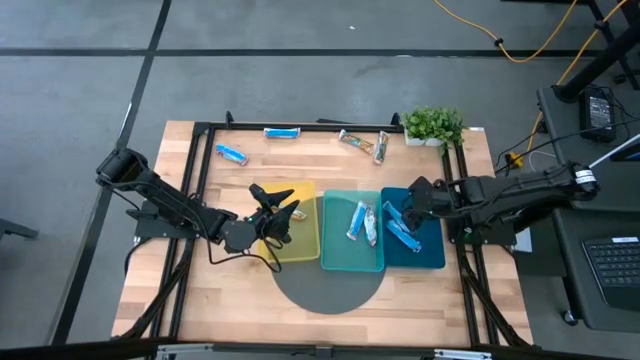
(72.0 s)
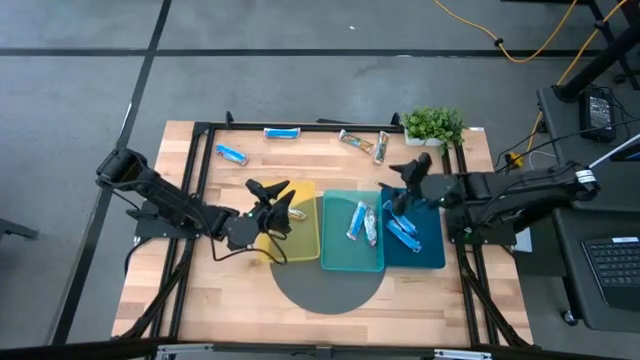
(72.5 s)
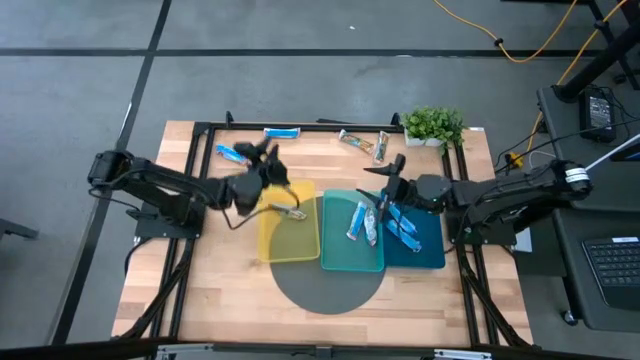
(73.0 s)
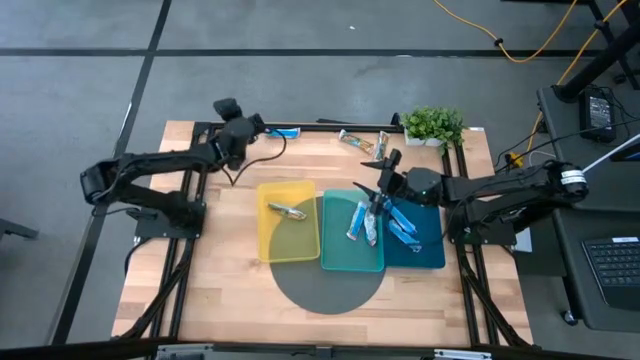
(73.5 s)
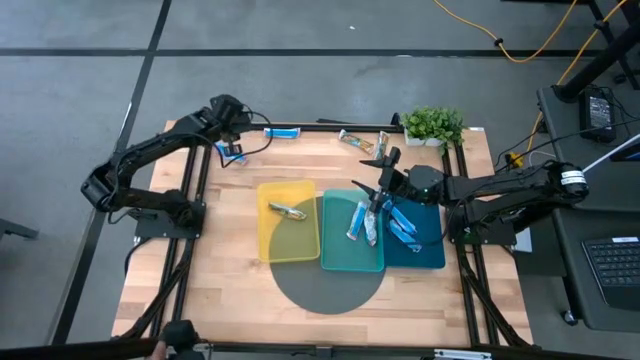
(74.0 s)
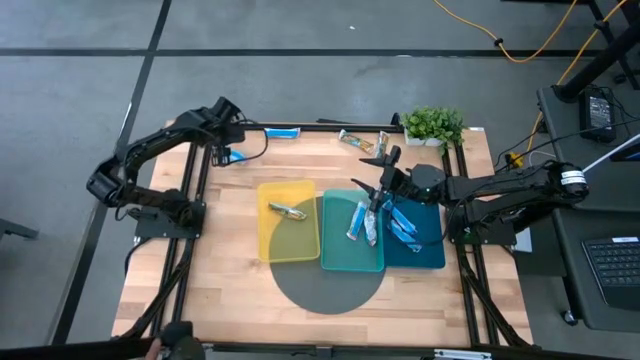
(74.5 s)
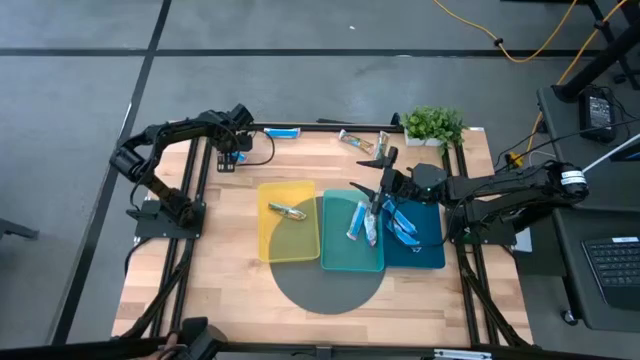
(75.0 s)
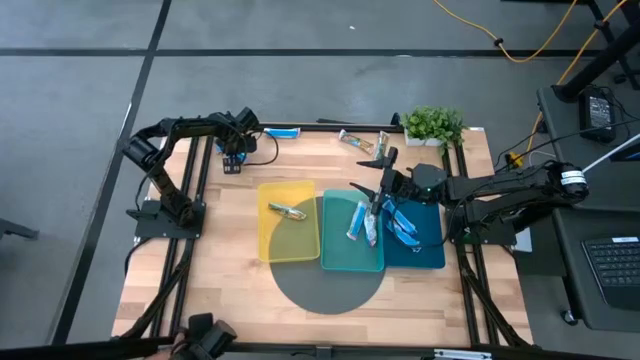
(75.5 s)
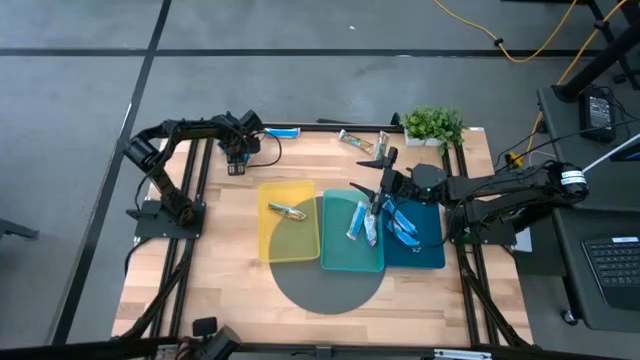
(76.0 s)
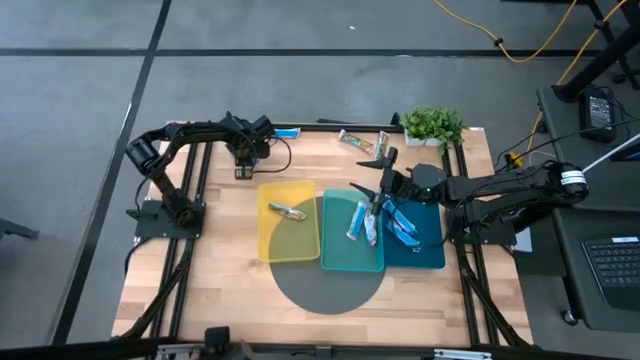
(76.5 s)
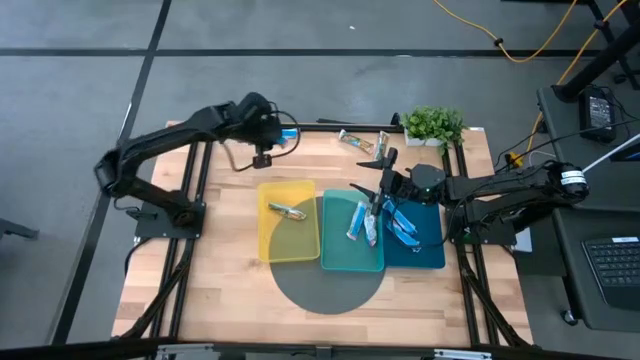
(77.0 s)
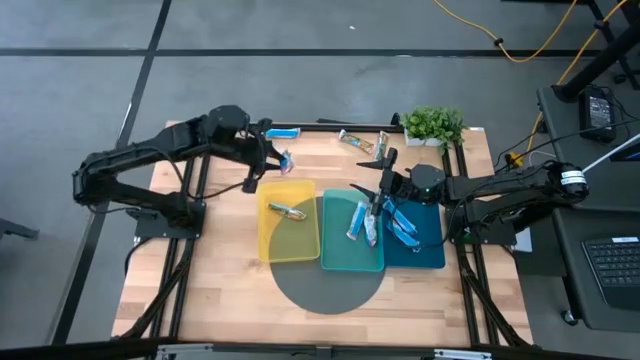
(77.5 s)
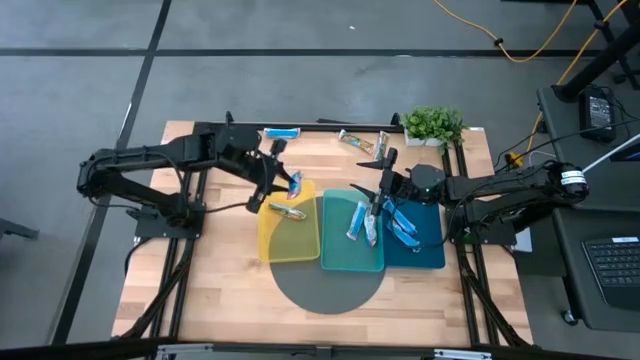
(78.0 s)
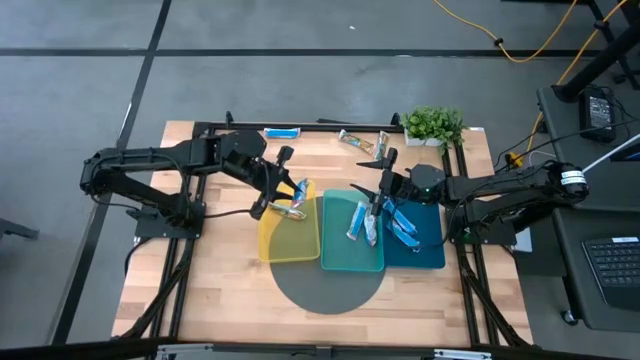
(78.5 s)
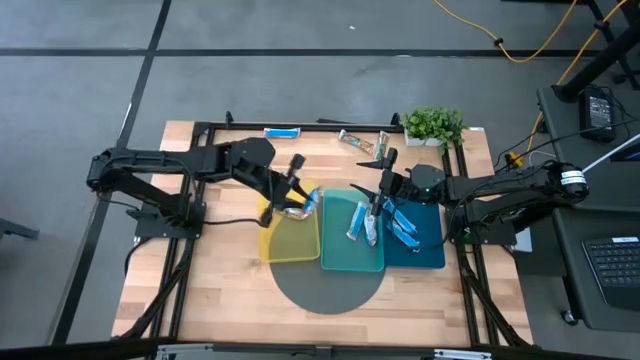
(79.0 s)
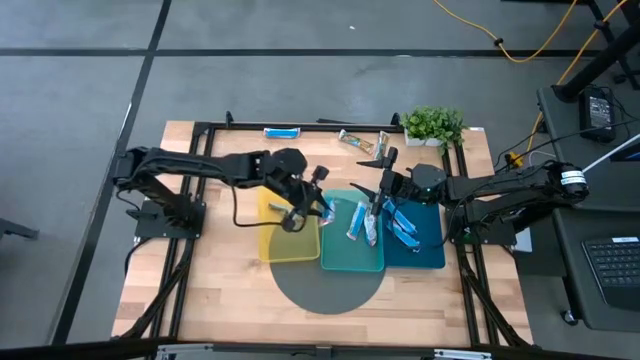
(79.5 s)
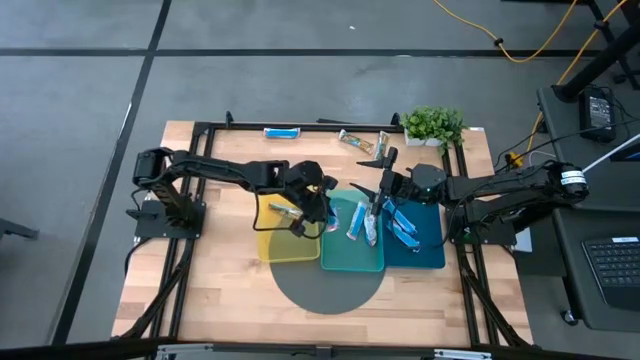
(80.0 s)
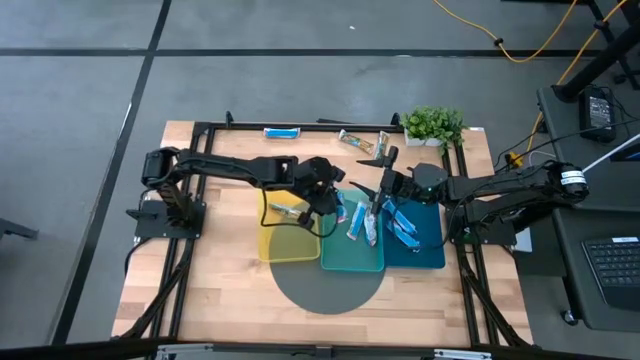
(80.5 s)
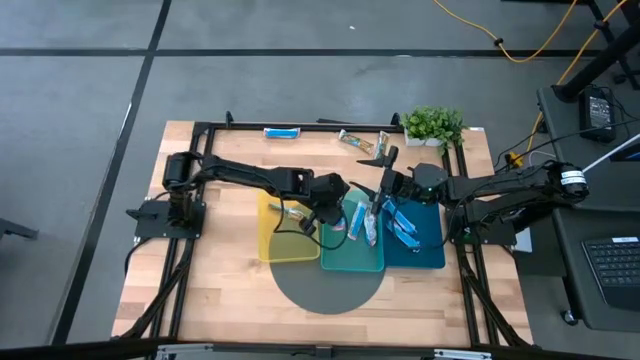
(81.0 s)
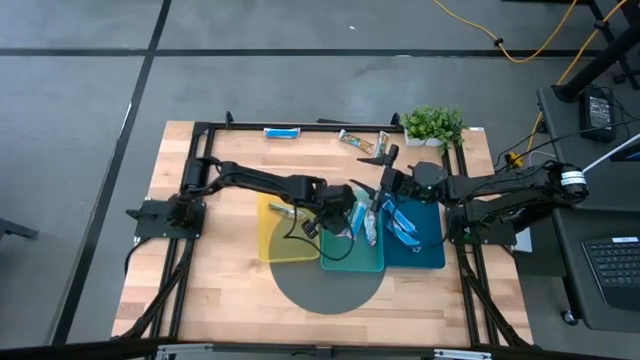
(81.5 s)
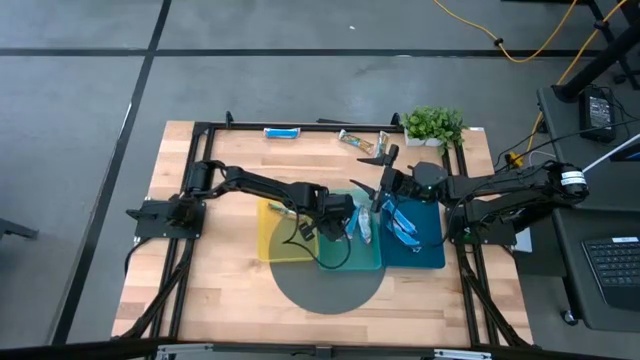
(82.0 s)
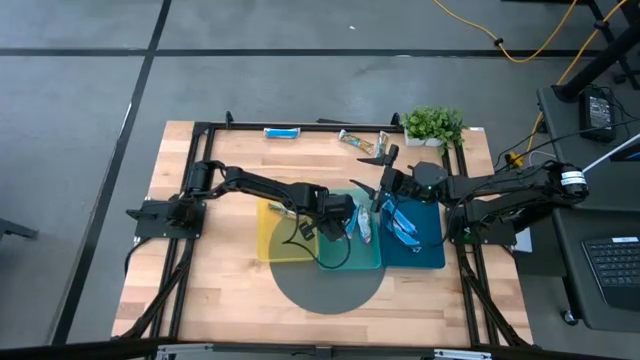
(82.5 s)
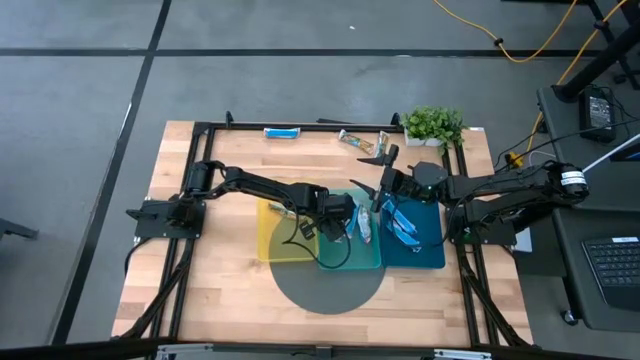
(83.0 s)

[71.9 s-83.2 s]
Task: Pick and place Granola Bars by type
Put the red granola bar into the green bin

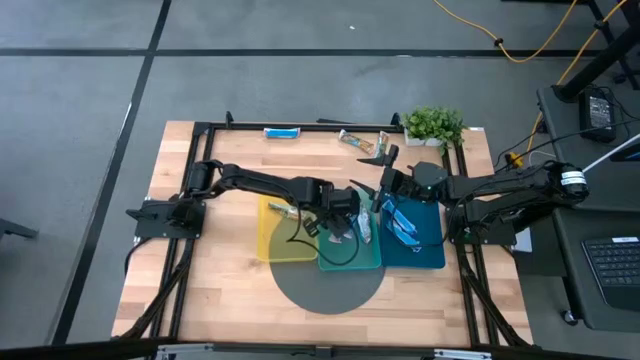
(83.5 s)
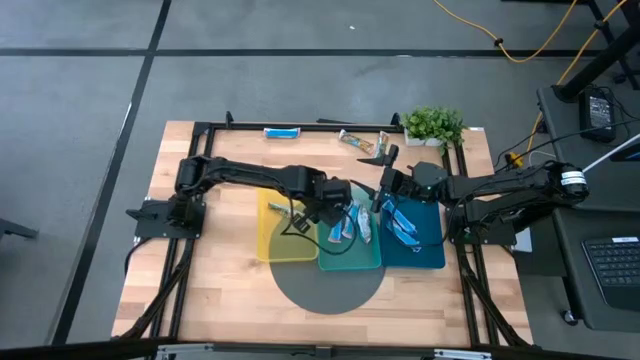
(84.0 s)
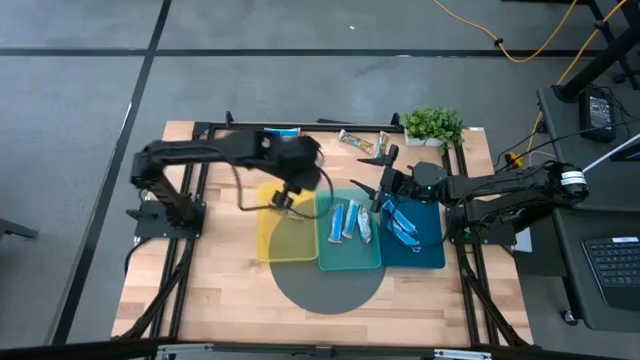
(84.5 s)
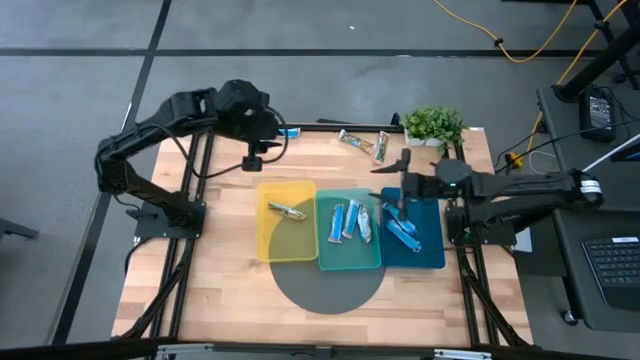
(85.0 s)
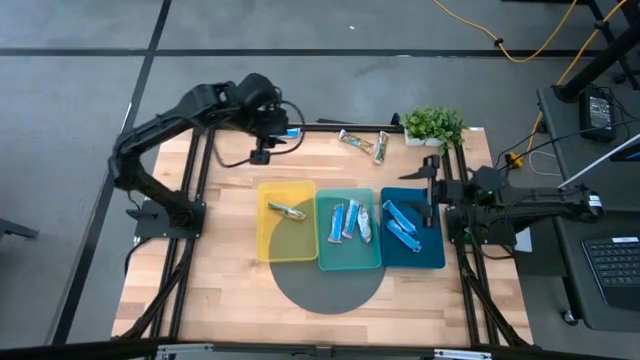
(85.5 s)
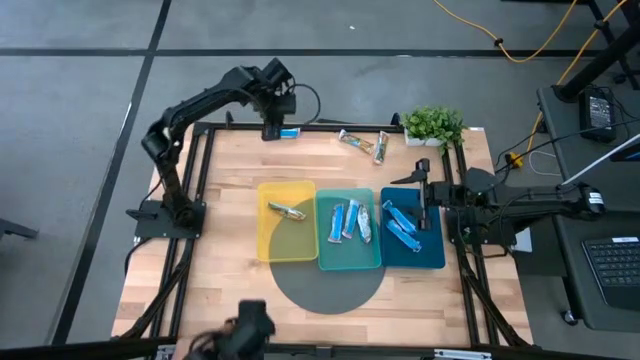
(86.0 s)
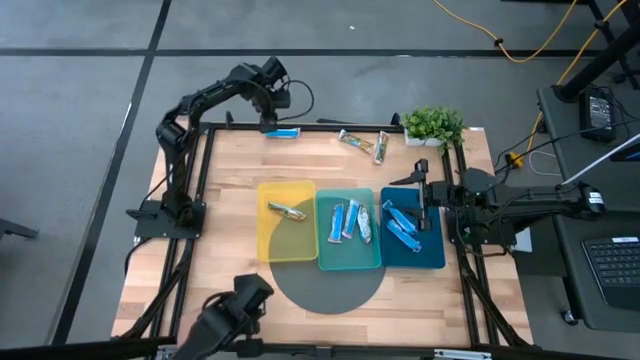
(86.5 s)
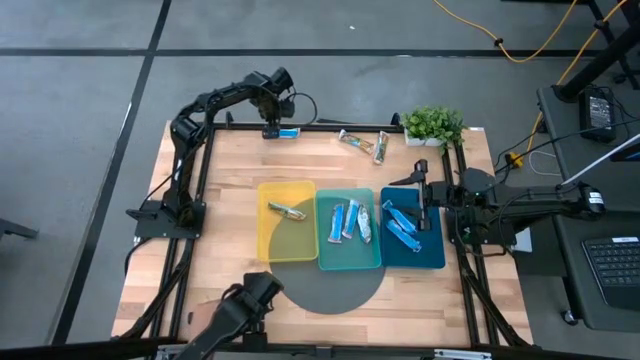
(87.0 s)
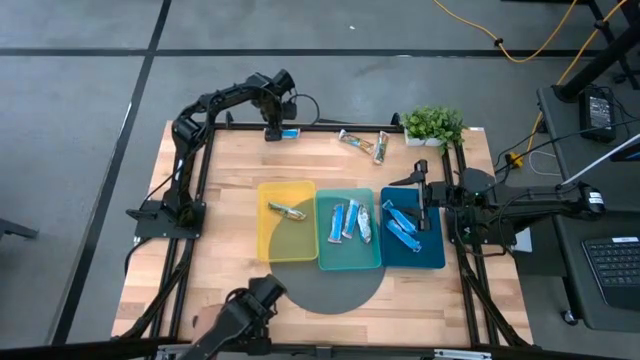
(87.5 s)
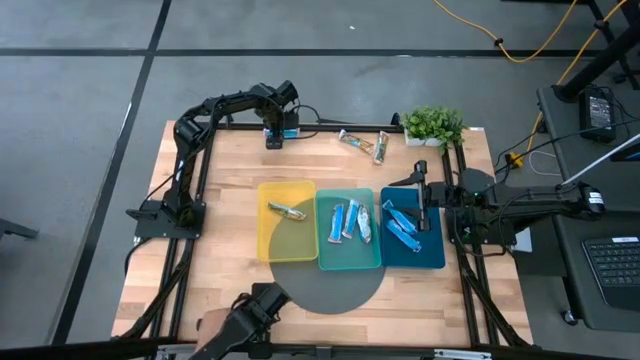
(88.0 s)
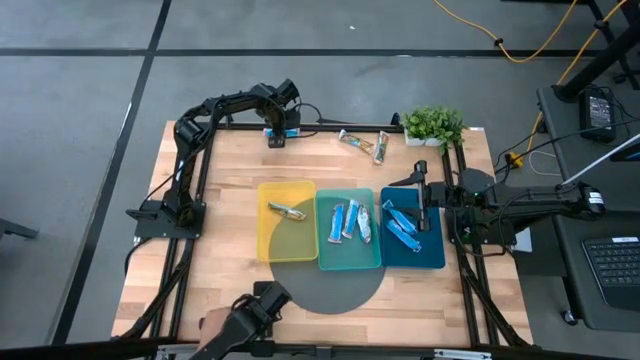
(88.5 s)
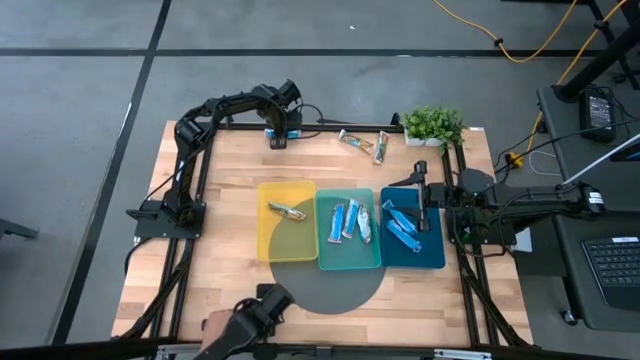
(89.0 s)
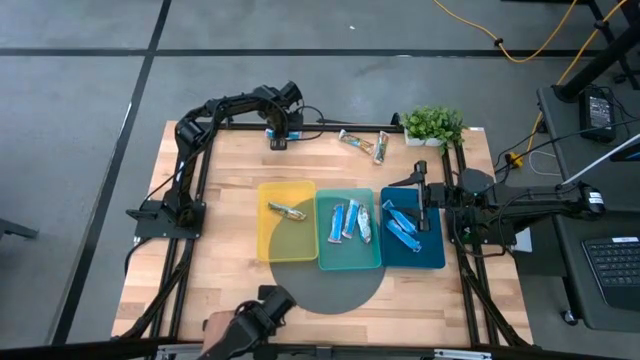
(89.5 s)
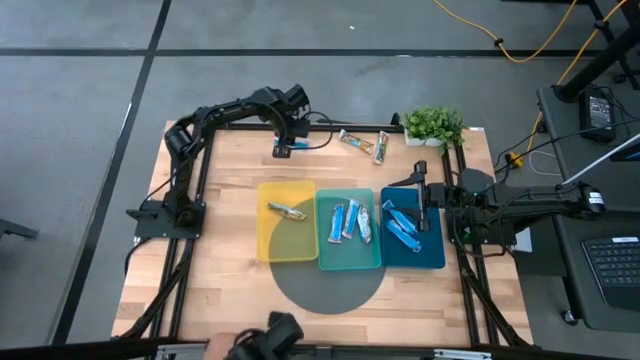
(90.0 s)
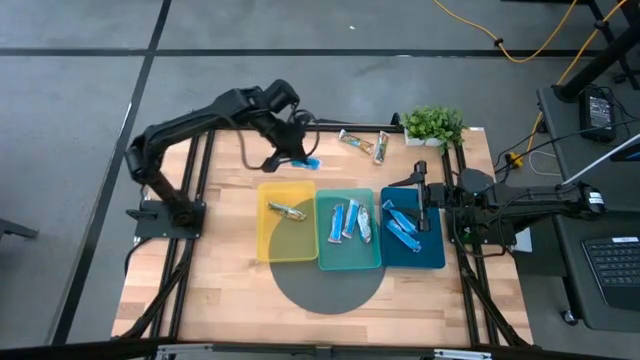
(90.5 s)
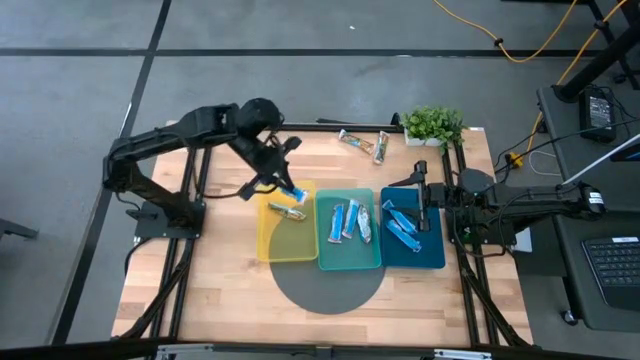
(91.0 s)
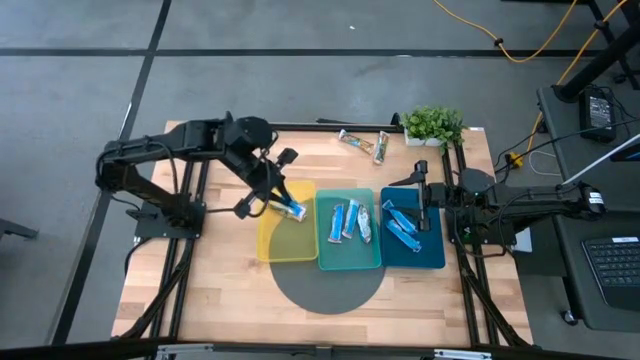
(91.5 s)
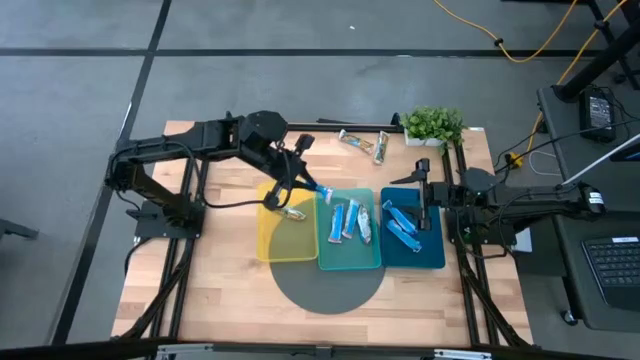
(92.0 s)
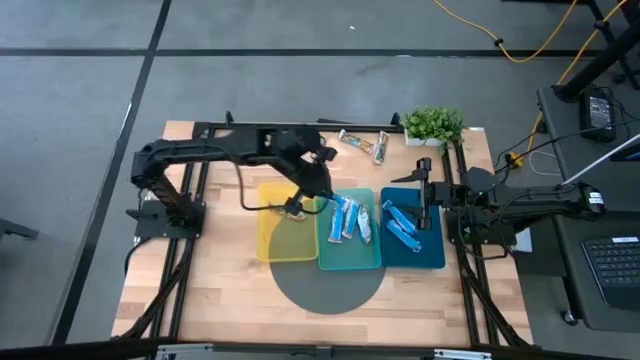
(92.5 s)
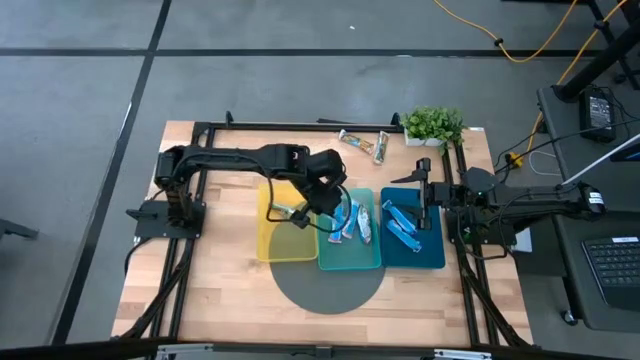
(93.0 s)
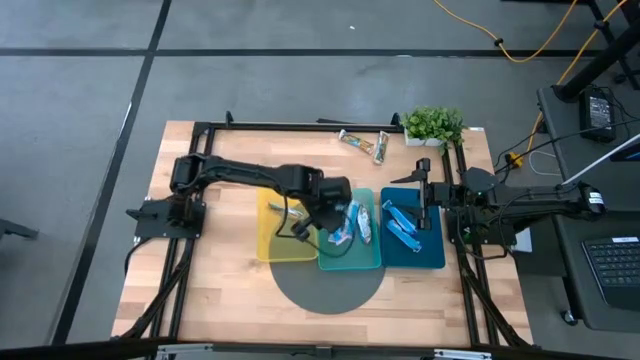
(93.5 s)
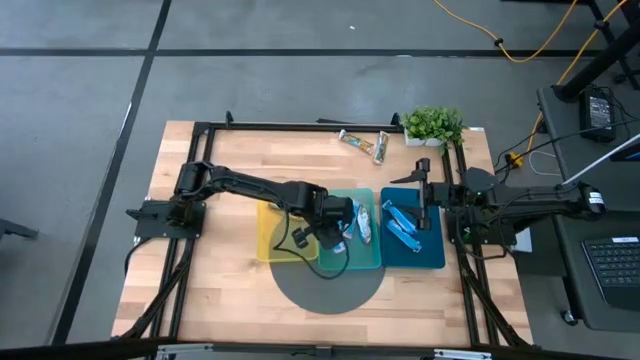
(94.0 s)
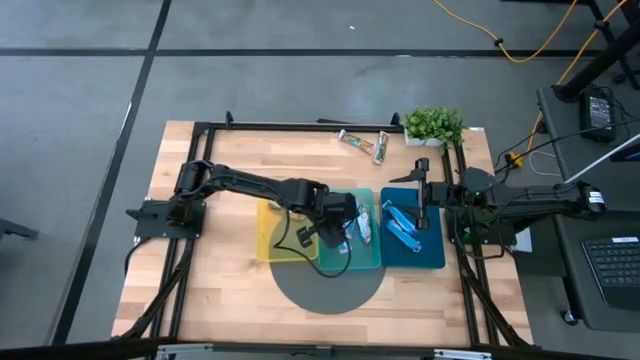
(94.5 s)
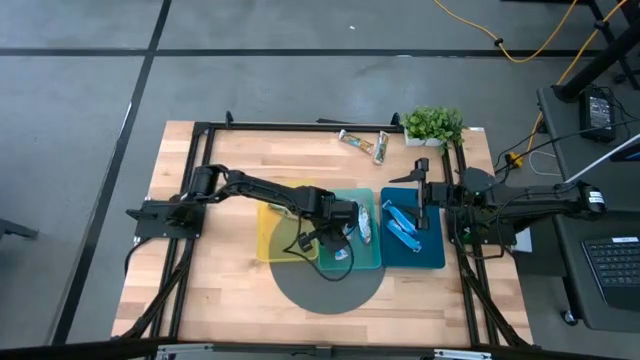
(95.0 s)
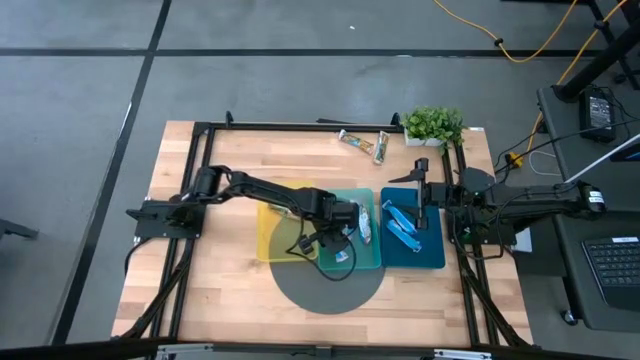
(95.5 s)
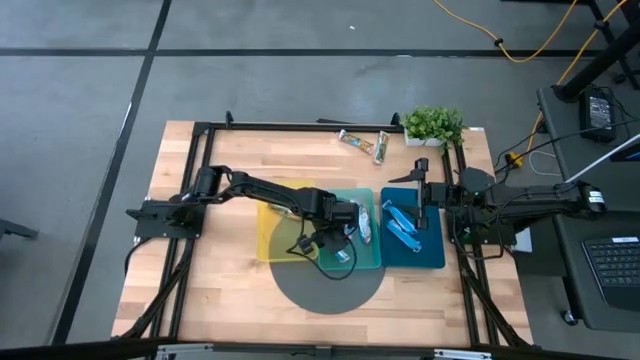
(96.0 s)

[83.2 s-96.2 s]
Put the red granola bar into the green bin
